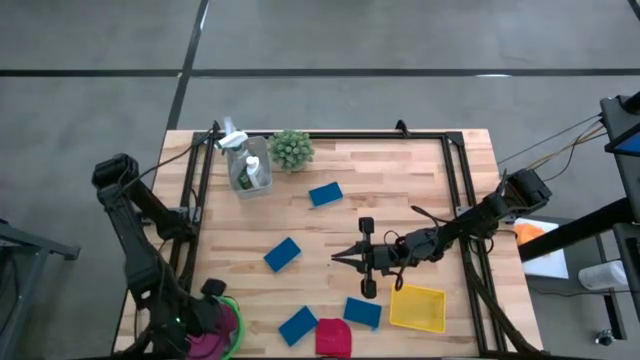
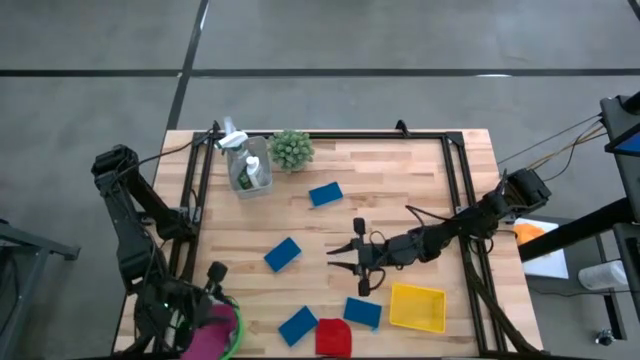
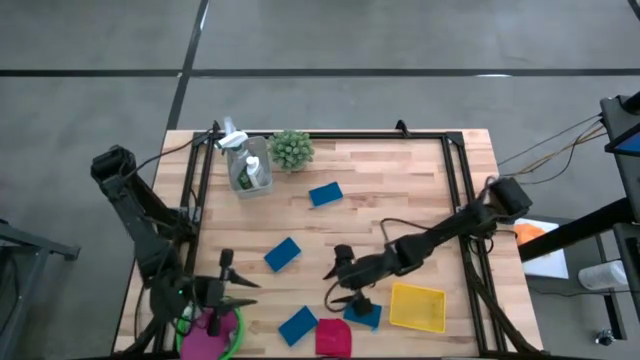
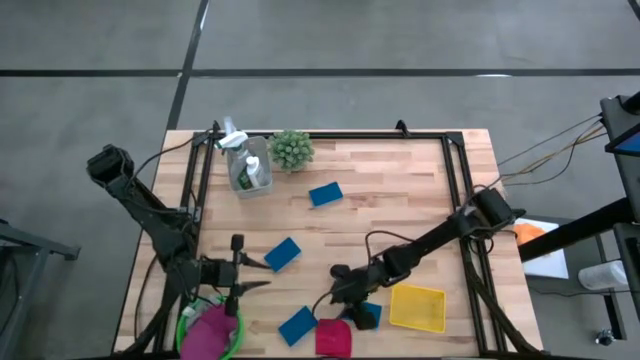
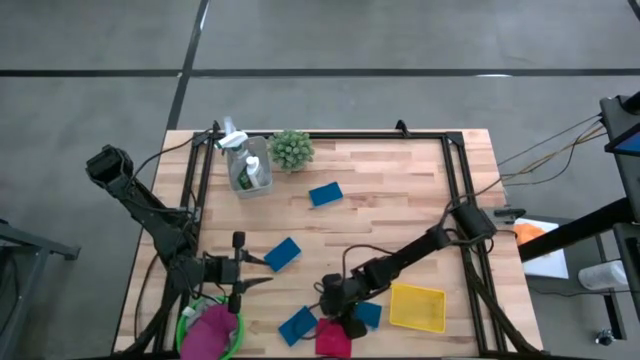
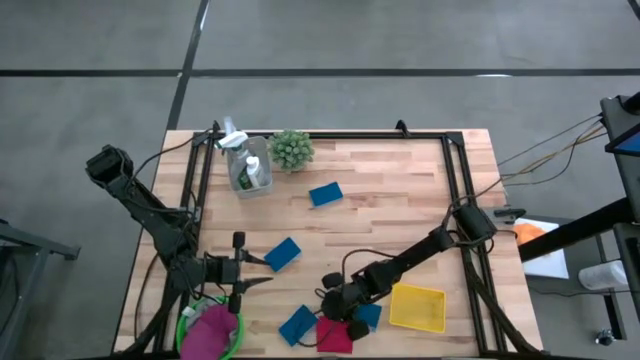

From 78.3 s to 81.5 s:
Task: Pick & Place Kitchen Items
Put the red towel into the green bucket

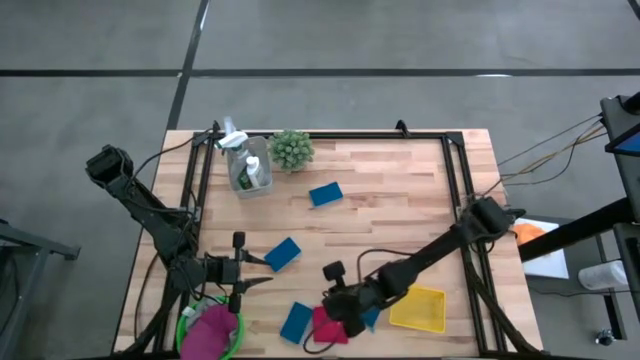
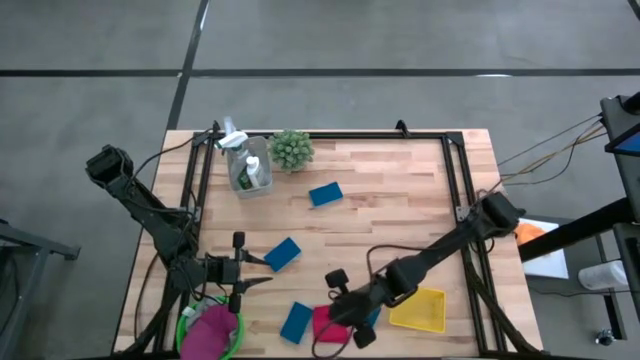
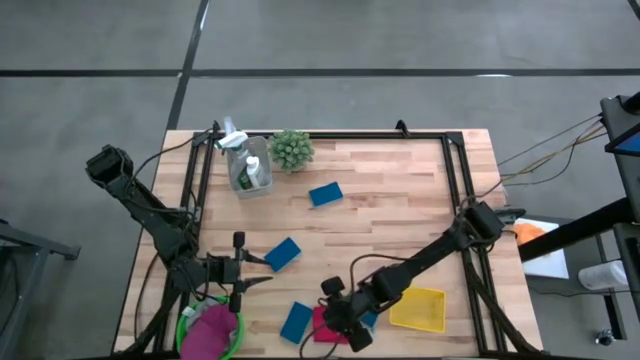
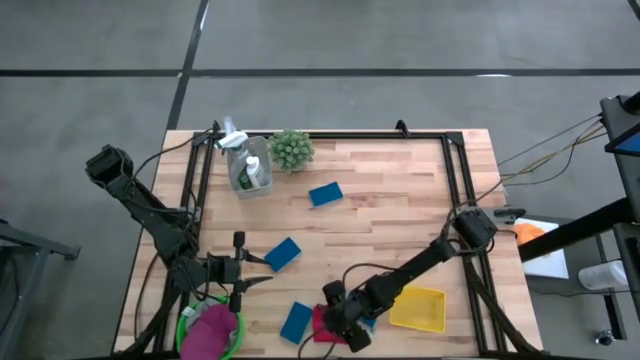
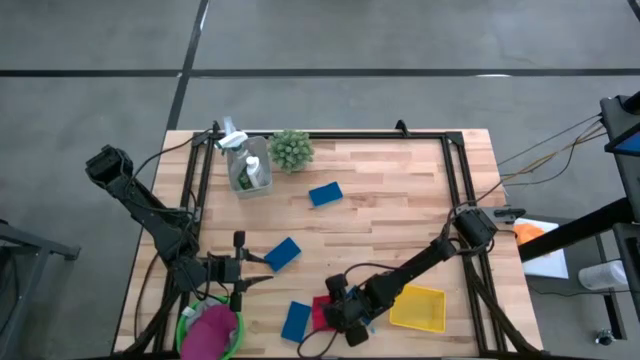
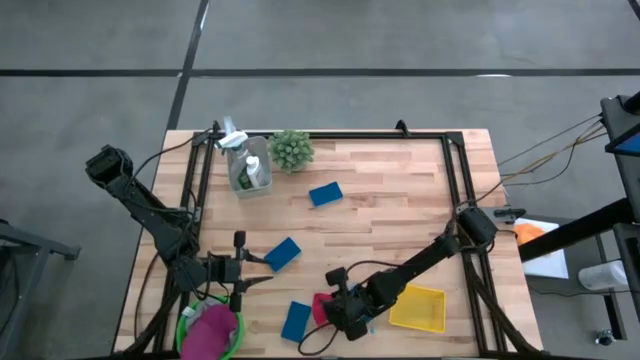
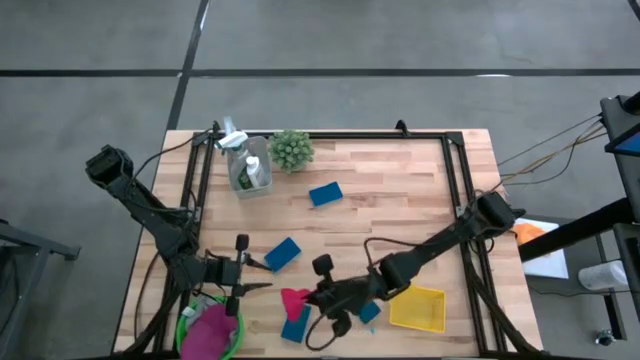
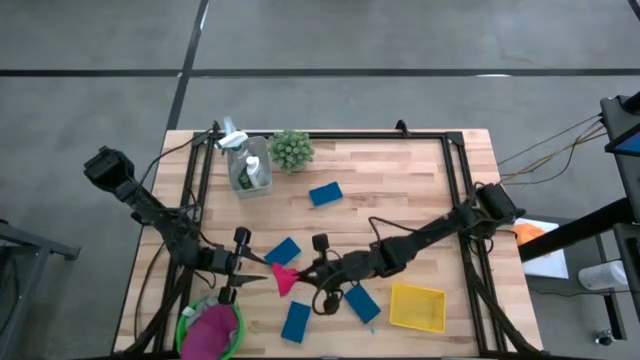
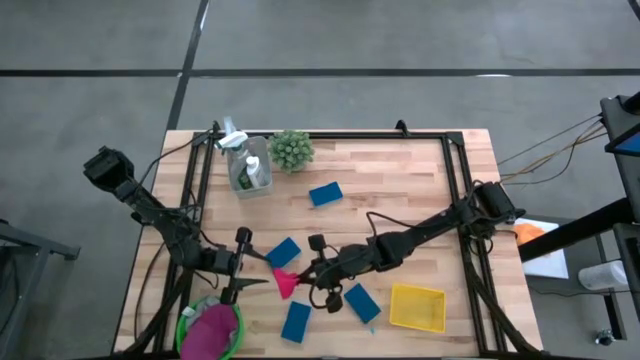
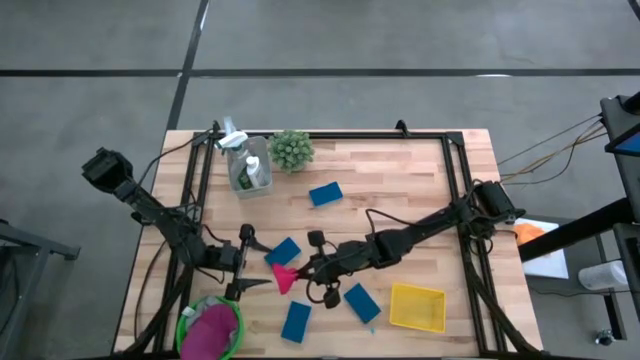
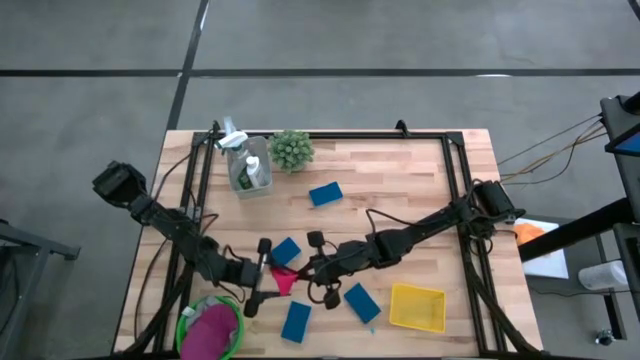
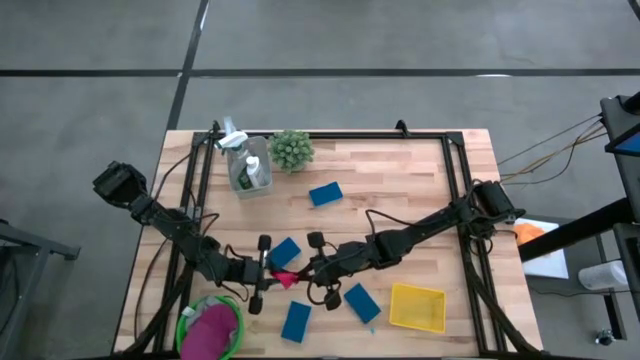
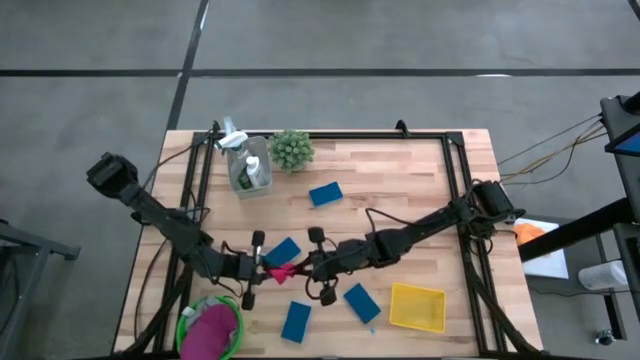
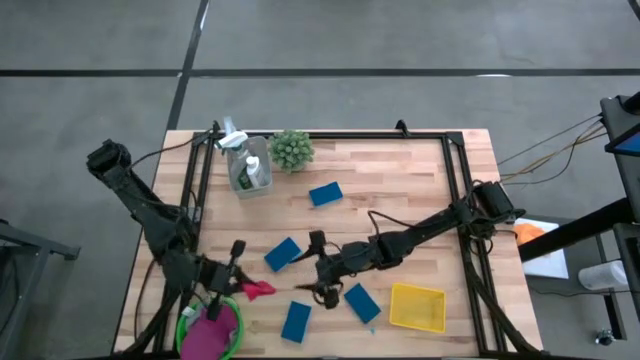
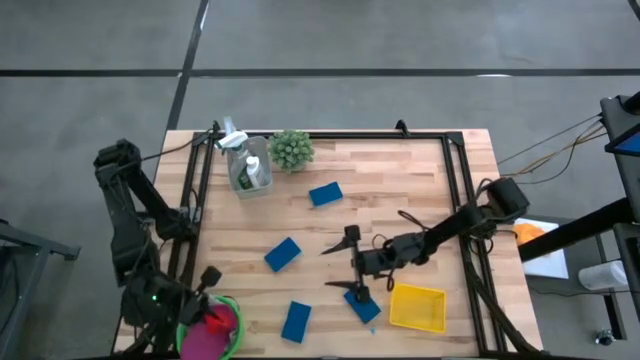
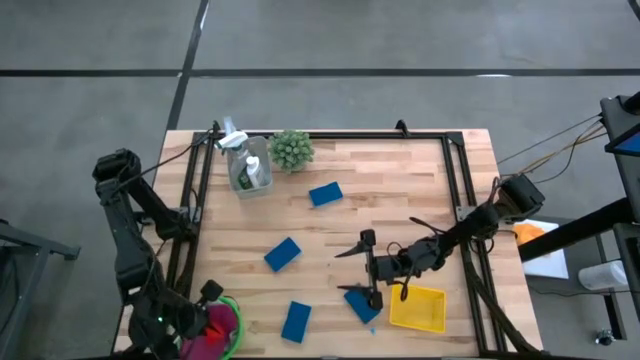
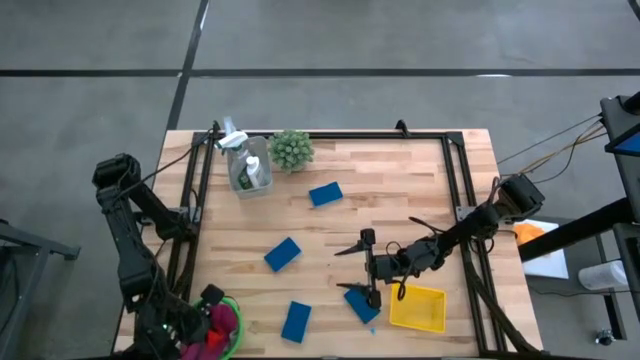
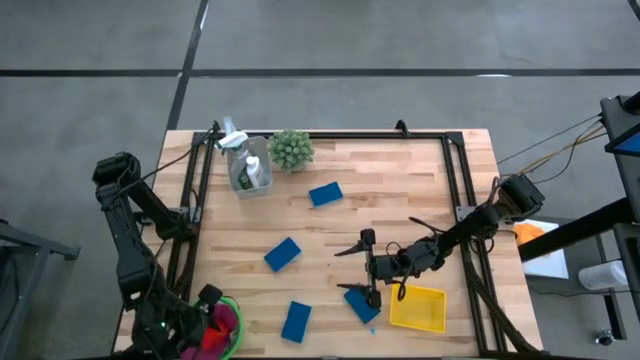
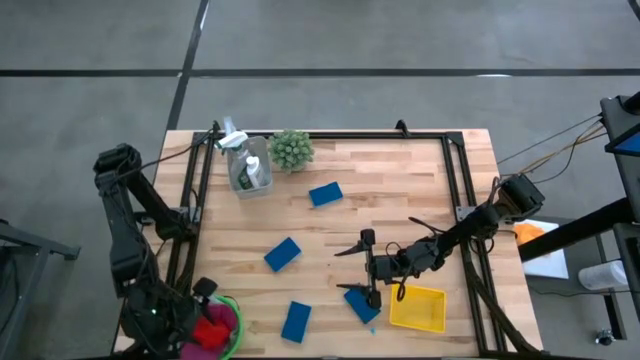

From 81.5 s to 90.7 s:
Put the red towel into the green bucket

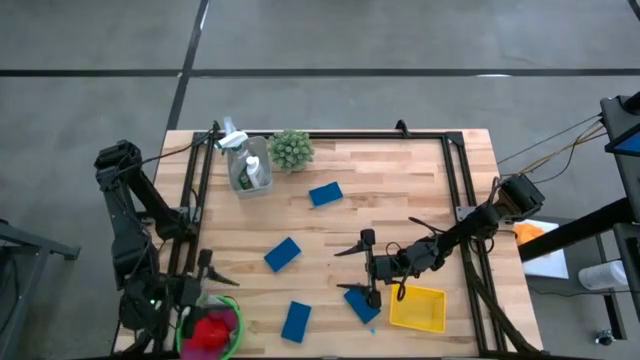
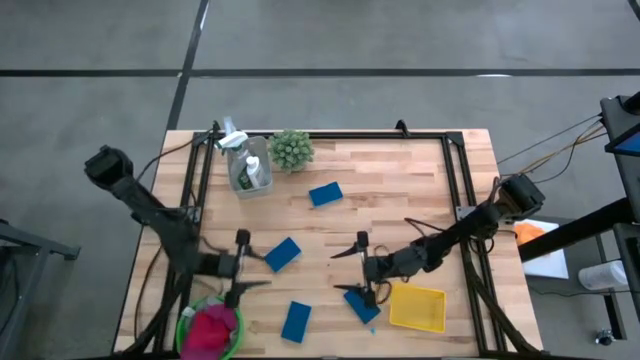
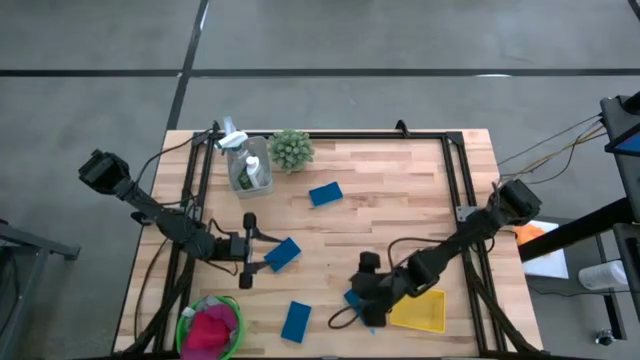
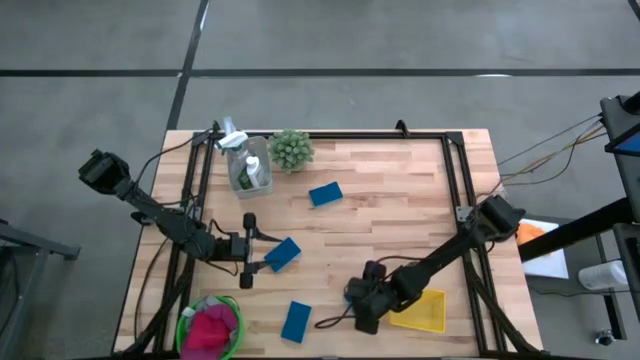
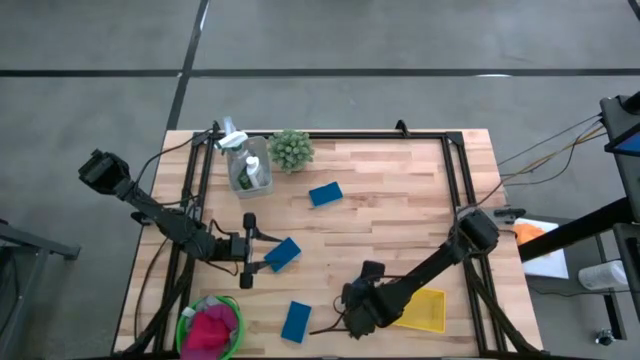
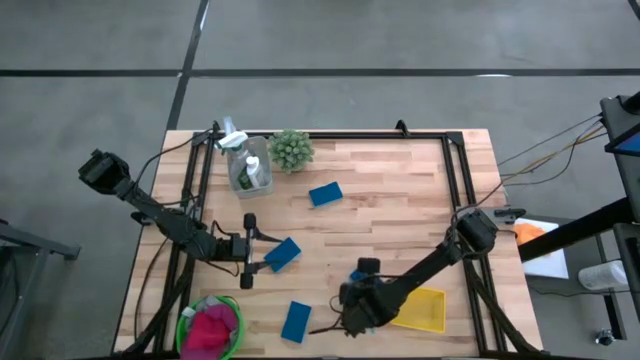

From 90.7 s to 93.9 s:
Put the blue sponge into the yellow bin

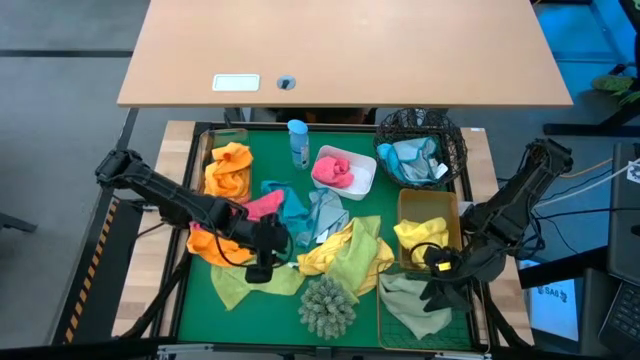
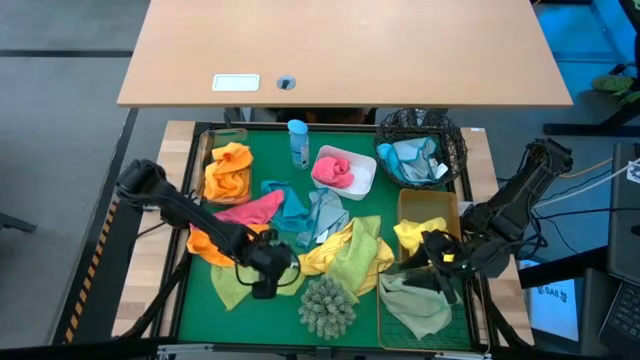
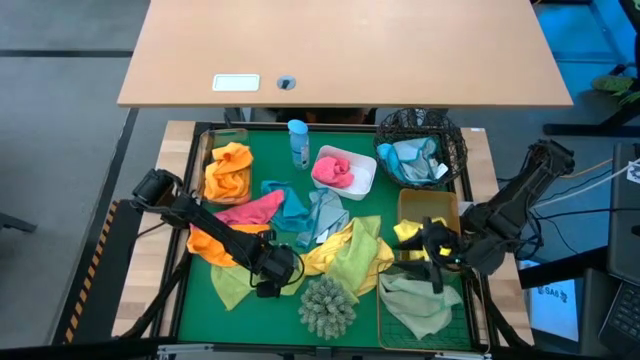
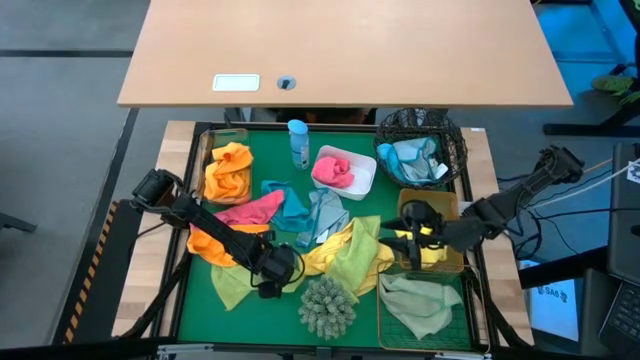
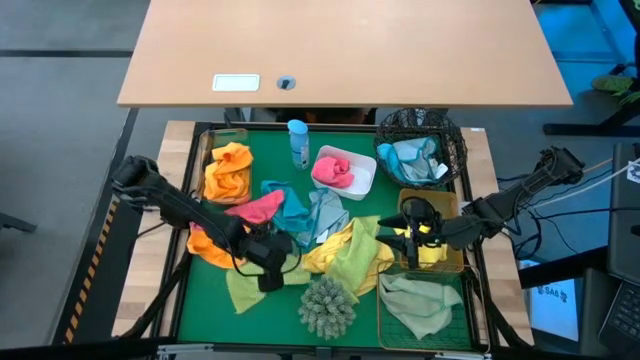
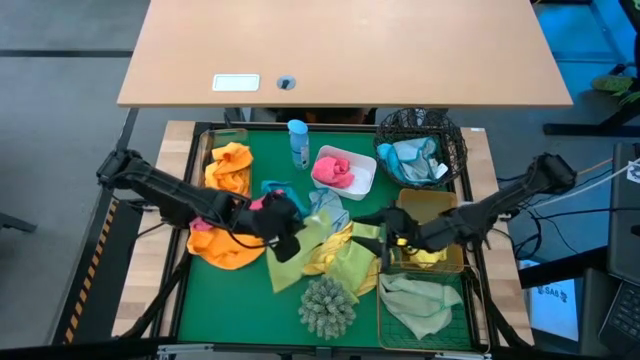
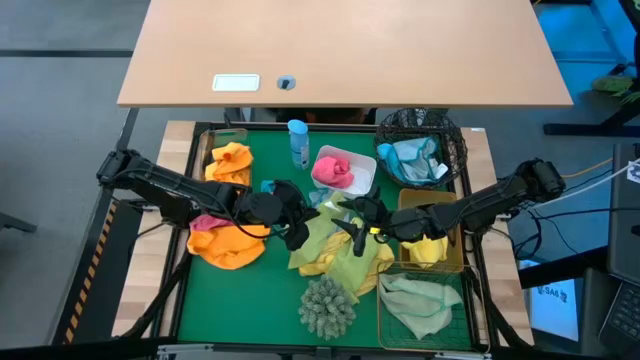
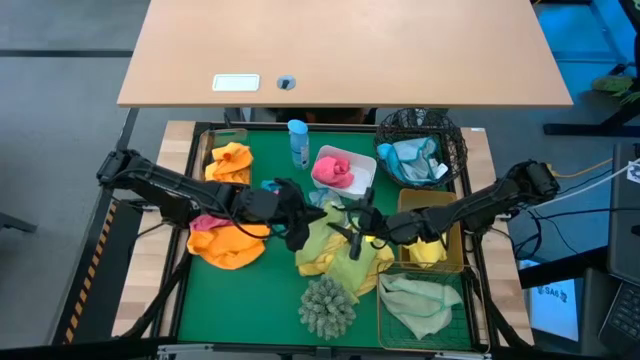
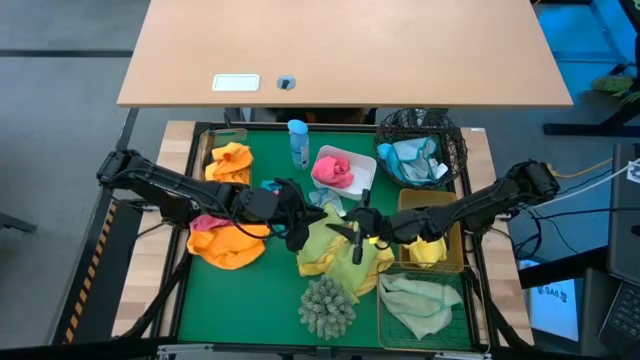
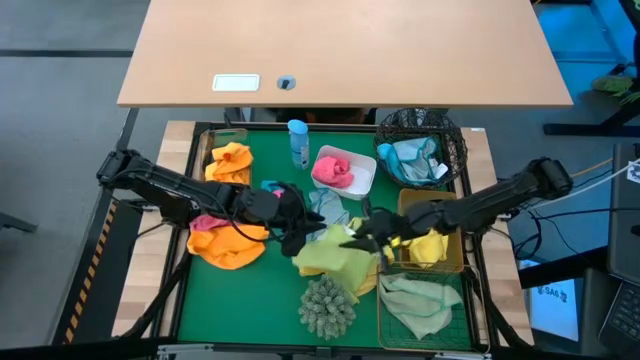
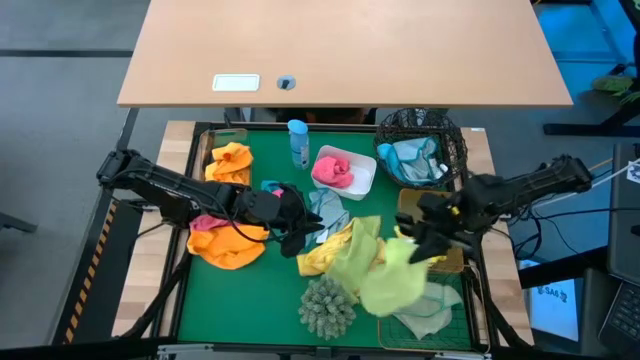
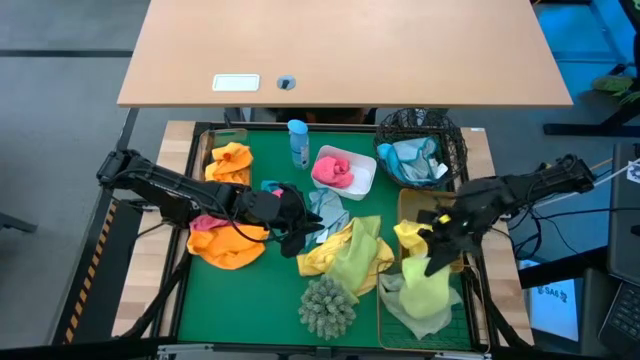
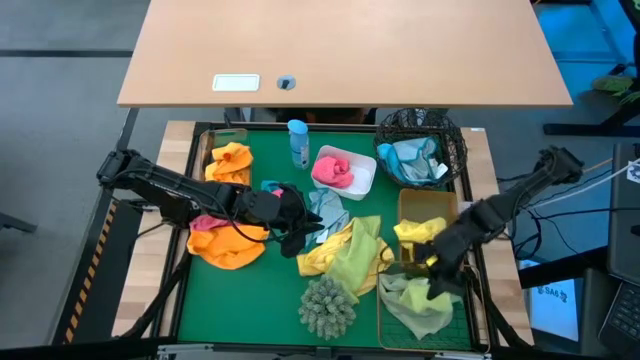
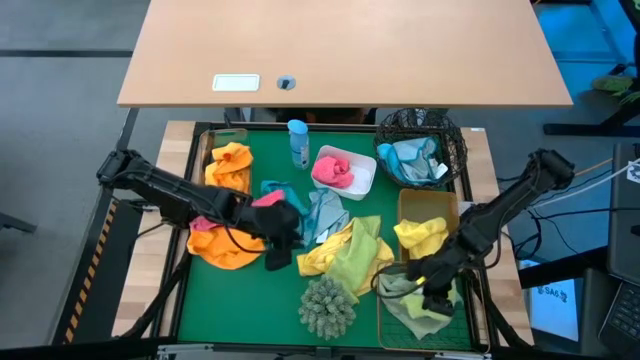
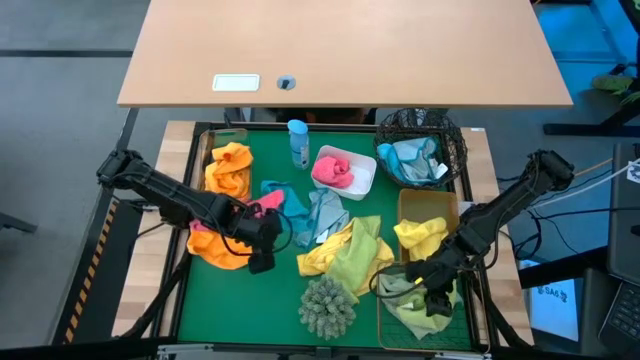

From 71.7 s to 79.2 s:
Task: Sort microfiber towel by color & place in baskets
Put the green microfiber towel into the rectangular wire basket
